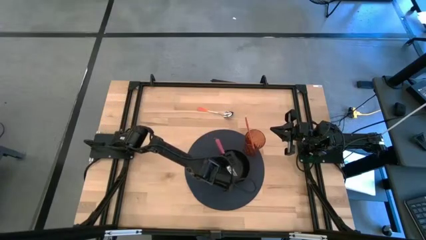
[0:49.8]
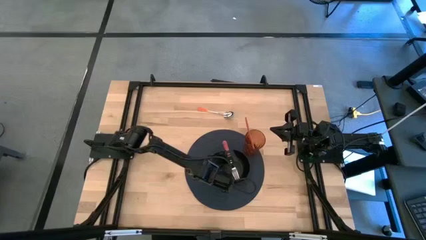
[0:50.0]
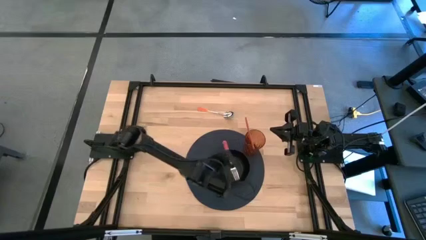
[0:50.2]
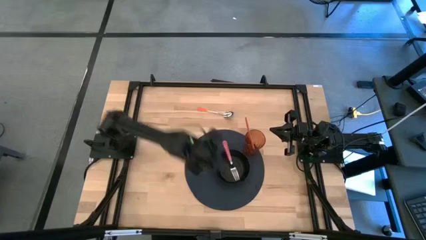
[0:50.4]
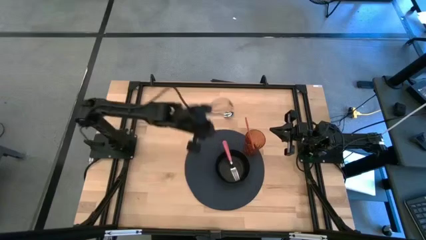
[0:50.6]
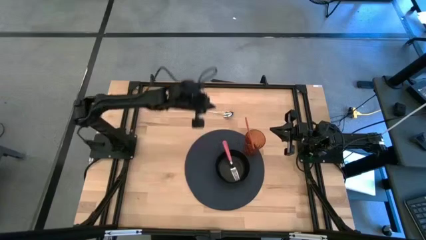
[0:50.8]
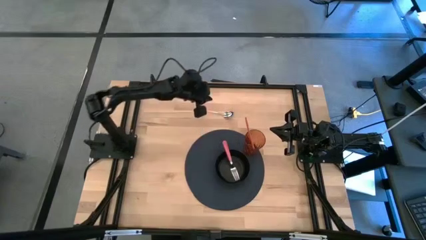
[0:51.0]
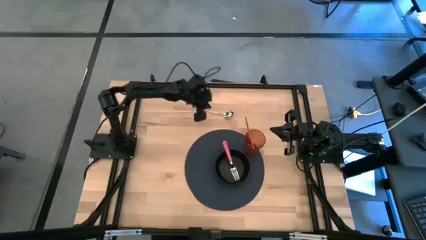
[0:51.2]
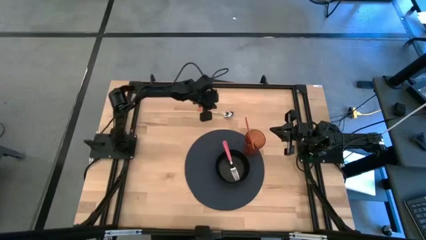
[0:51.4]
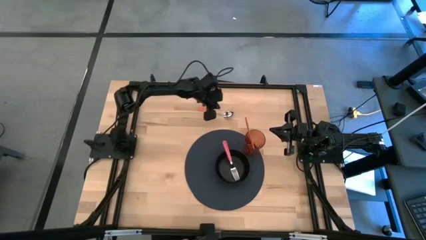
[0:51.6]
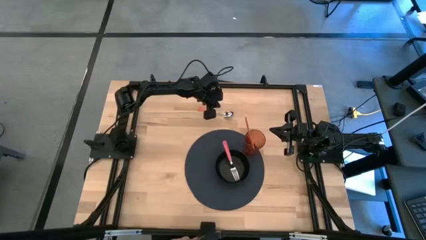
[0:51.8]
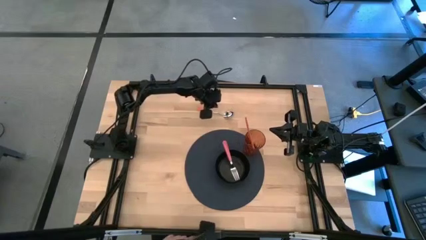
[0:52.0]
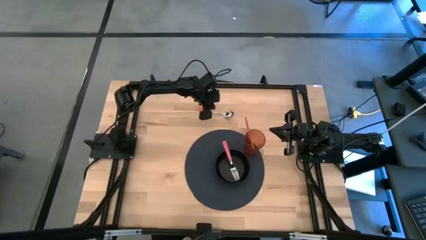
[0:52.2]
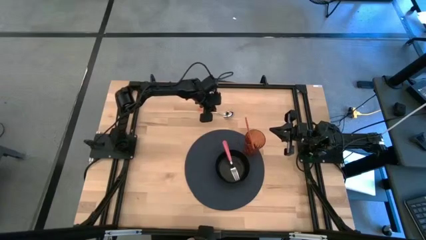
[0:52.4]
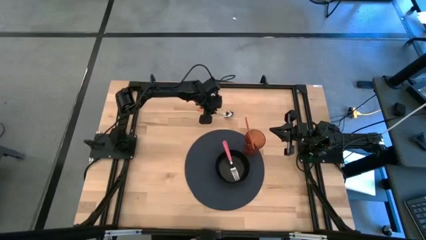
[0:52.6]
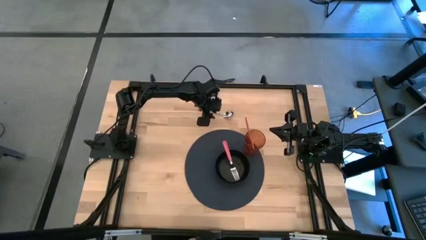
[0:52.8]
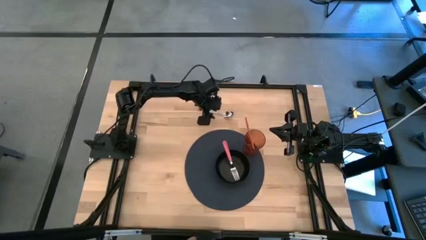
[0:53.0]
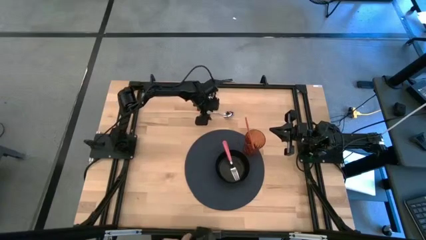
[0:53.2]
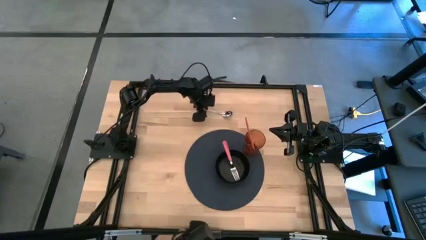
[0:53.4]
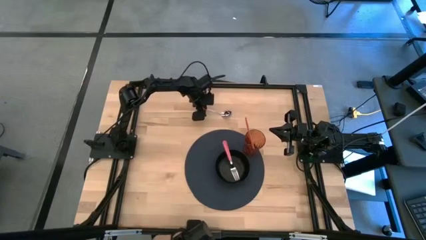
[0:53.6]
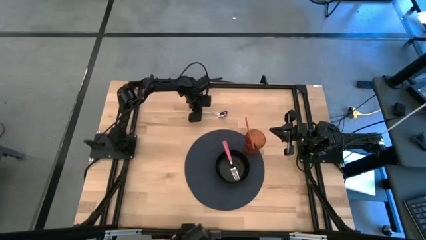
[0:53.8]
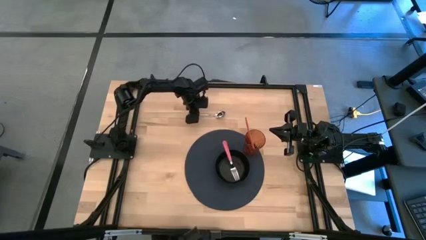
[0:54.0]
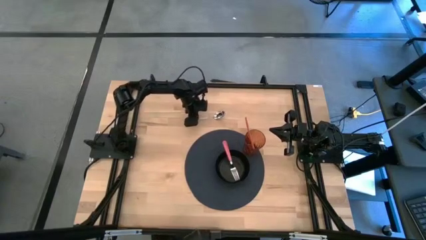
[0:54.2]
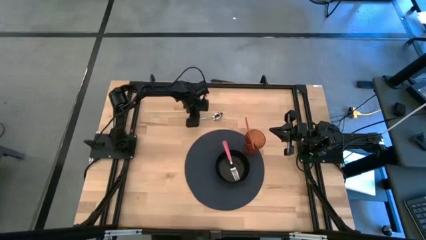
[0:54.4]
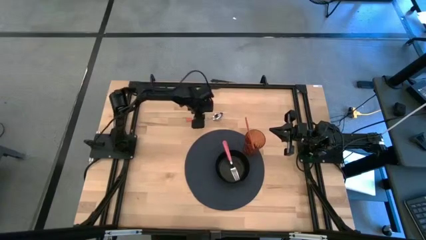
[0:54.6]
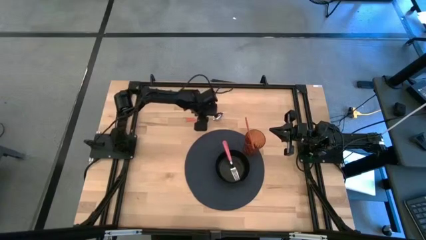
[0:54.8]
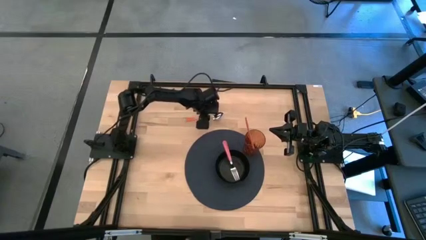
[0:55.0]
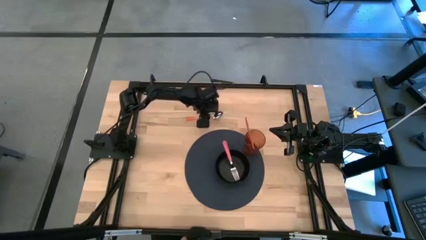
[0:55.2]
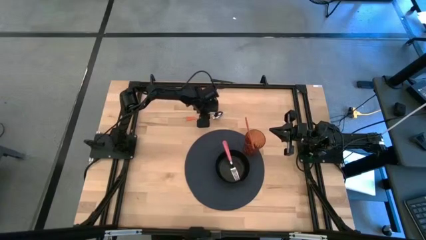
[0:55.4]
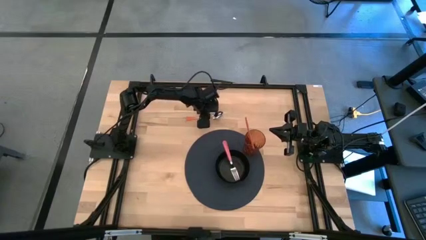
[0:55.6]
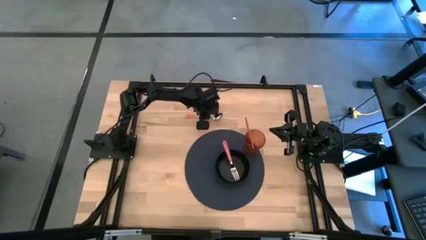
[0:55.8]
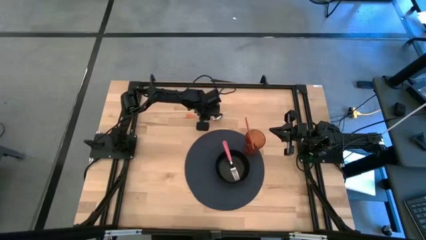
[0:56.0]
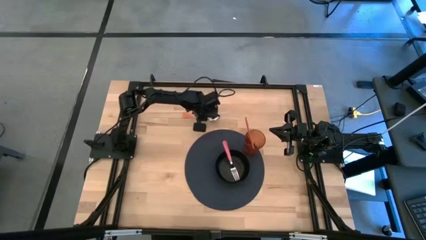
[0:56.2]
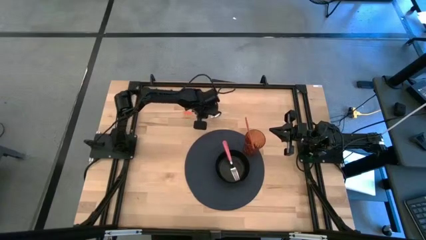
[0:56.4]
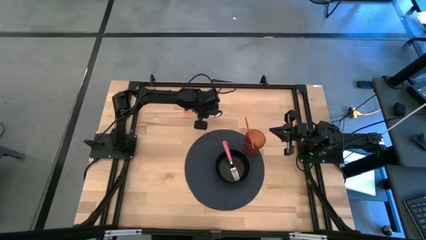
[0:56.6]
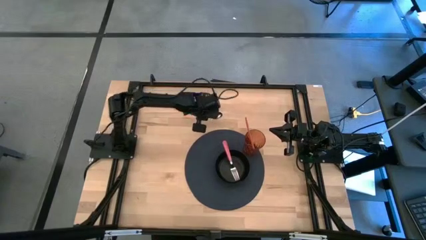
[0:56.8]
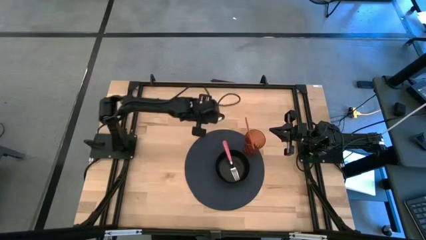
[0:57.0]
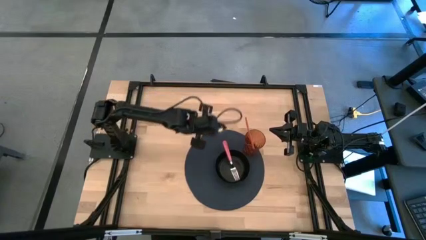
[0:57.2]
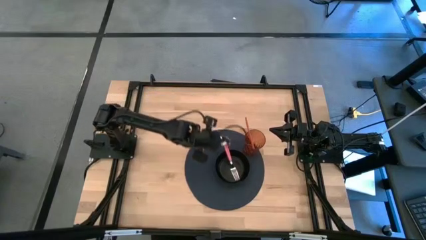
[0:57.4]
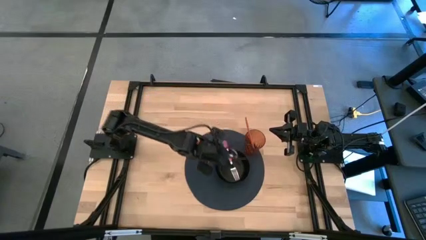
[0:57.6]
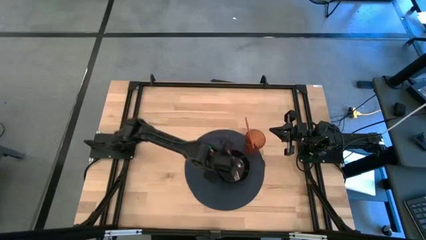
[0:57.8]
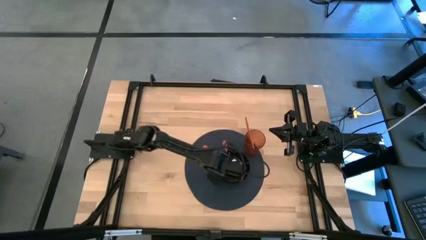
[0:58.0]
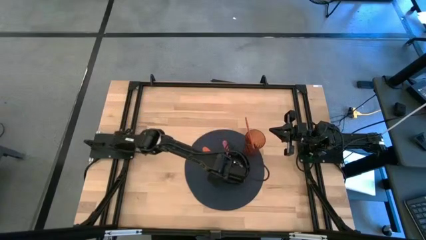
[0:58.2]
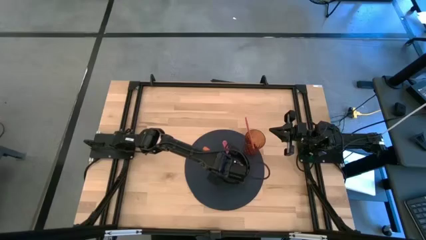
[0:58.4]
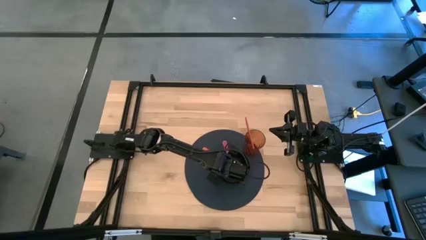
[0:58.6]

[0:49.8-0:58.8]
Task: Pick & Place Utensil
Put the orange spoon into the black bowl

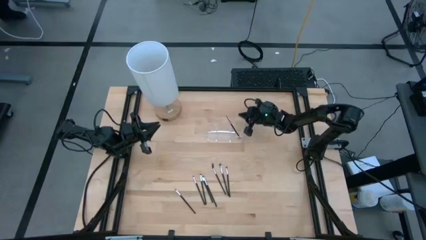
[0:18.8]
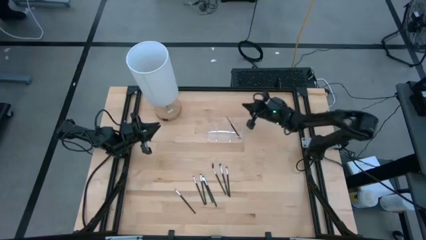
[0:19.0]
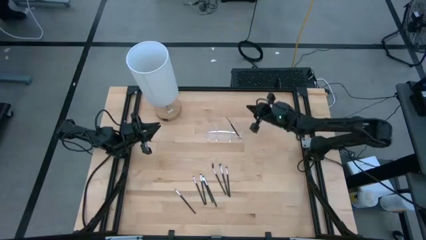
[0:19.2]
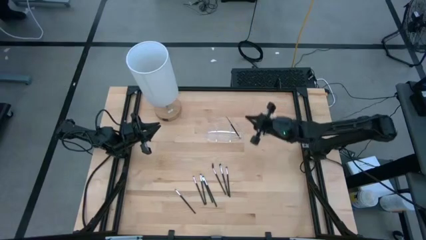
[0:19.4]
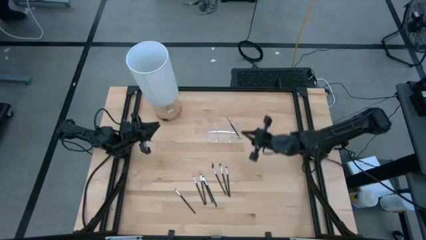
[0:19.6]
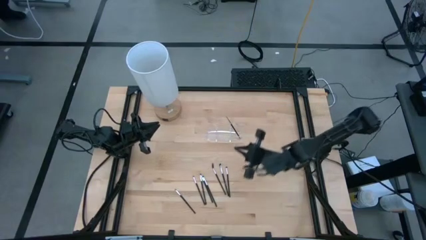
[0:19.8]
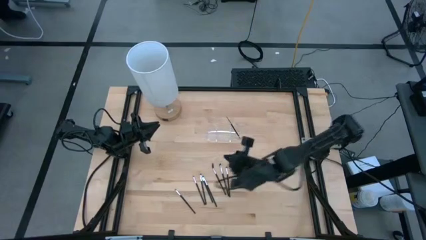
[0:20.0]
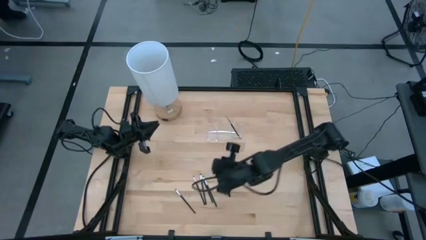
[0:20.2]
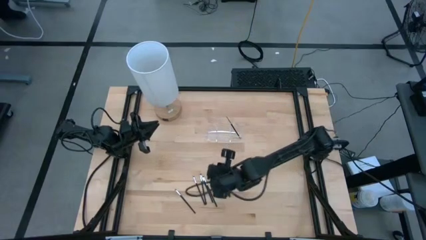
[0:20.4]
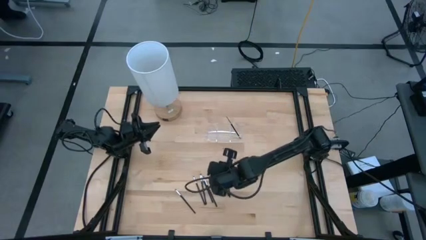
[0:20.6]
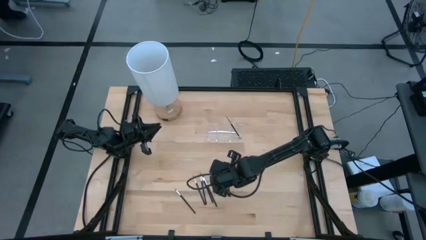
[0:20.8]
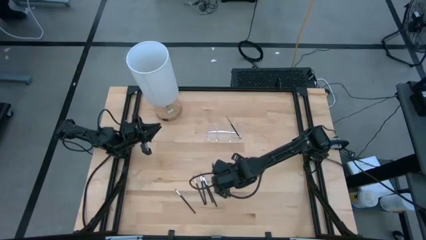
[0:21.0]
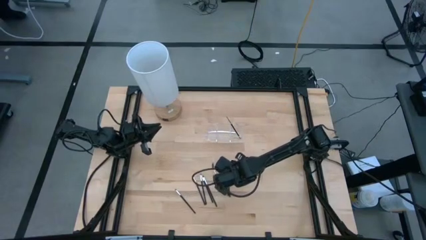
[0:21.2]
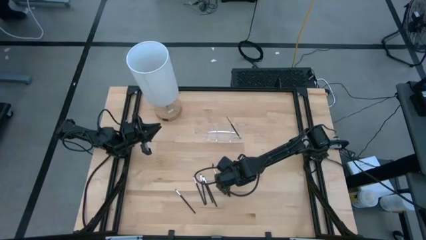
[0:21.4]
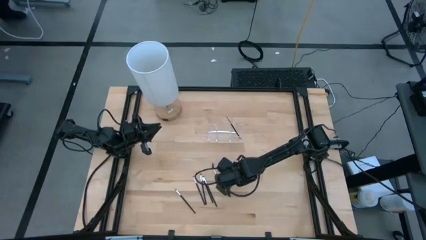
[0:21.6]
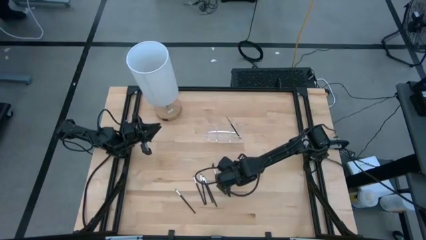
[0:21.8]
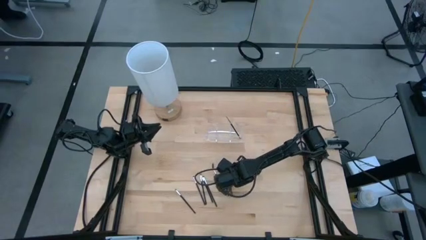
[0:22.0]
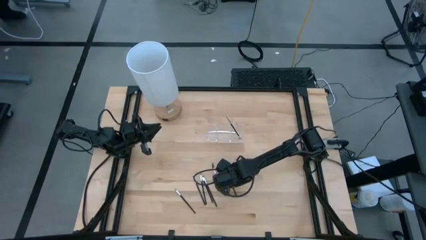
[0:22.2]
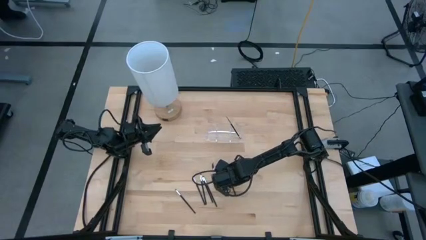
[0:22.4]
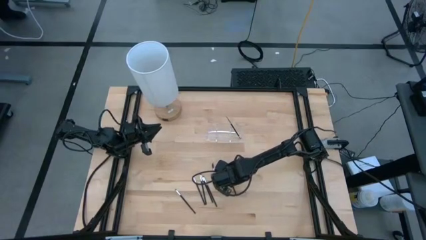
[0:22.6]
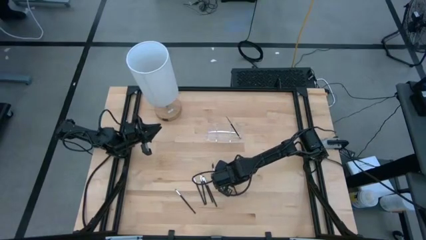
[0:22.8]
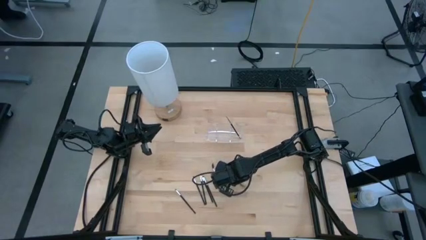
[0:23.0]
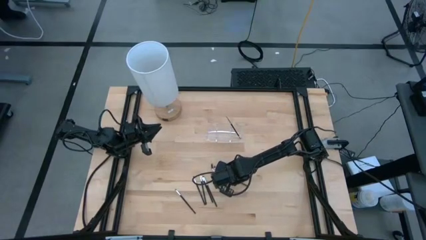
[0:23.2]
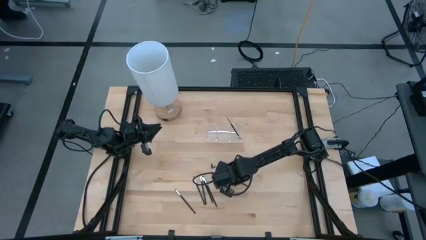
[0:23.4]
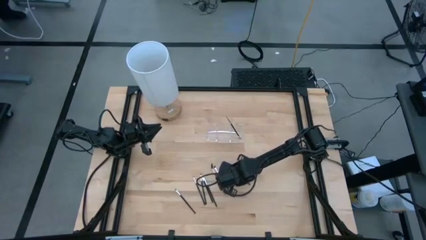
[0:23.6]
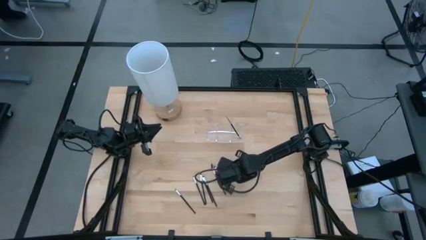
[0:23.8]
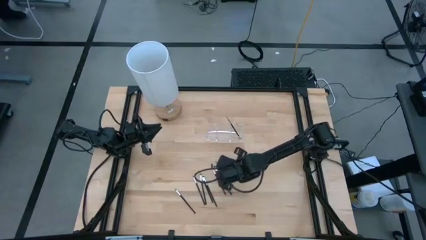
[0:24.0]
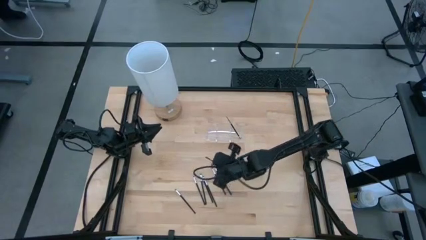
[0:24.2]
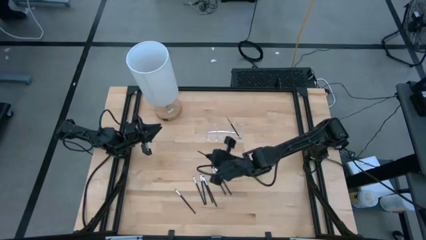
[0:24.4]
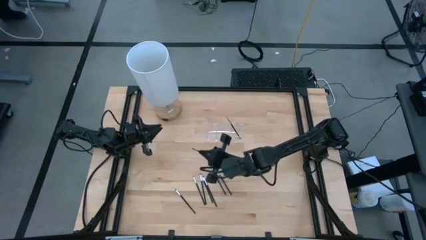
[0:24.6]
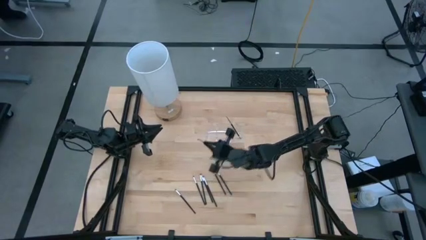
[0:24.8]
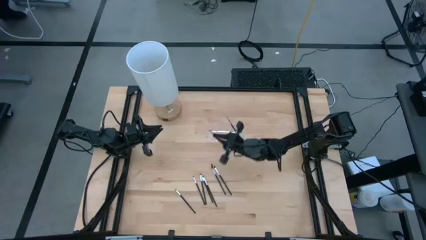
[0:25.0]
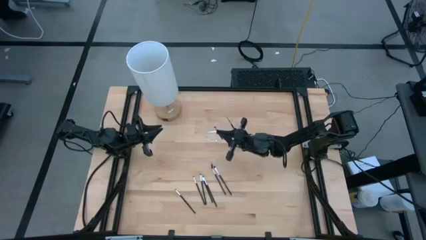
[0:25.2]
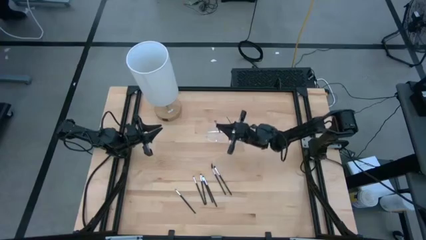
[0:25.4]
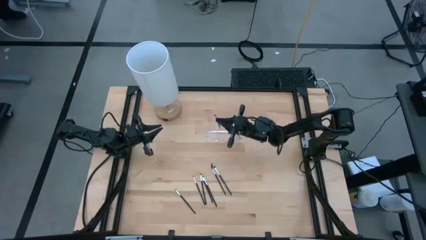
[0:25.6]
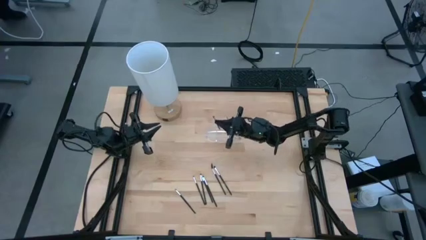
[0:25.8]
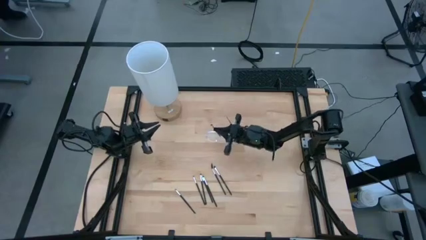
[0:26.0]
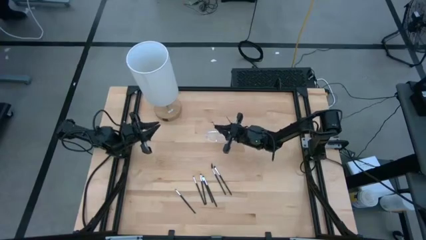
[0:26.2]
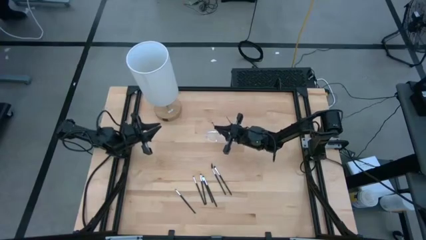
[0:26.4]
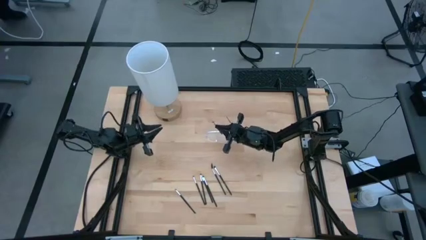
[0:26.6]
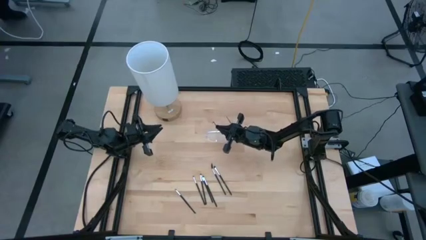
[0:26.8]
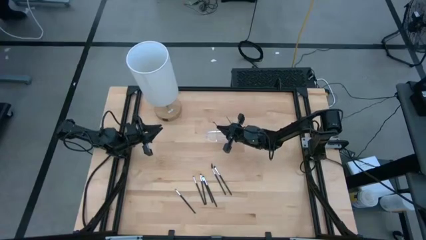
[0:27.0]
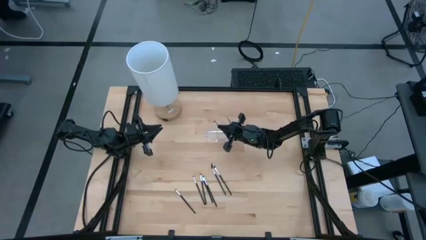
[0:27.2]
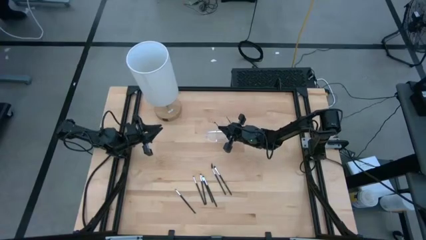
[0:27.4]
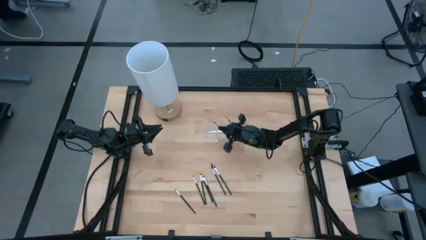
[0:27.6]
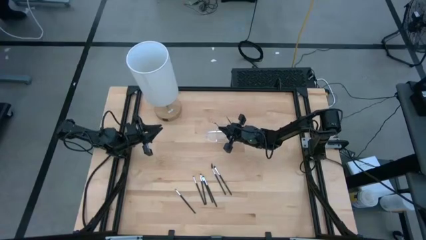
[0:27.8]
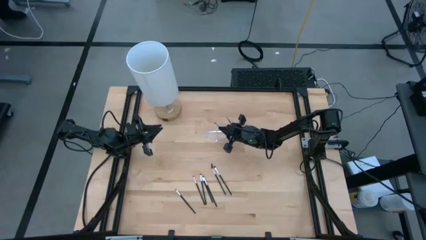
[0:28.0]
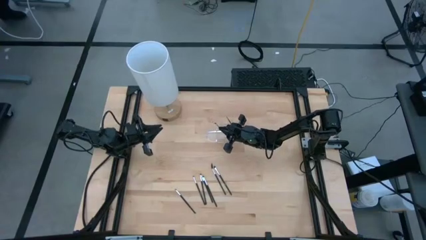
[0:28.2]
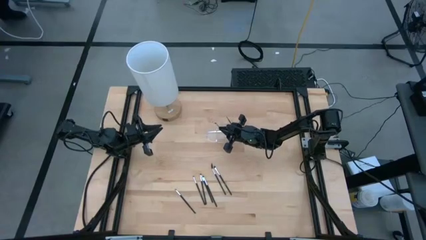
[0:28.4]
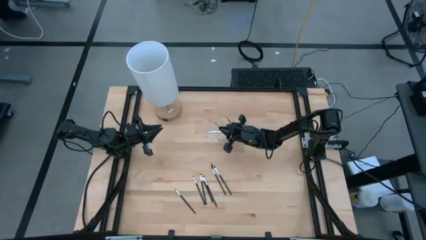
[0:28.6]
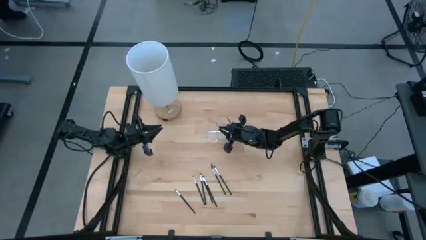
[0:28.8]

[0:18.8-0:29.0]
Task: Put items in baskets/containers
Put the black eyeshadow brush into the transparent organizer
